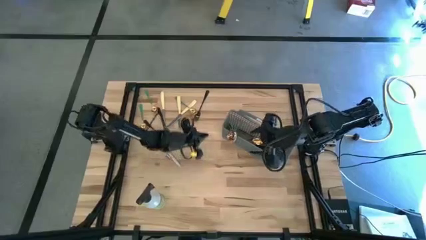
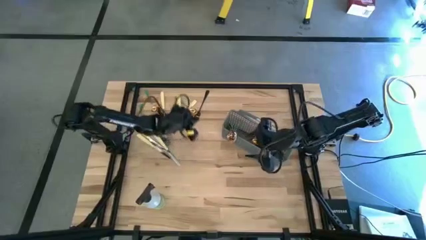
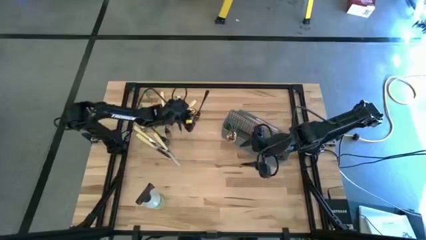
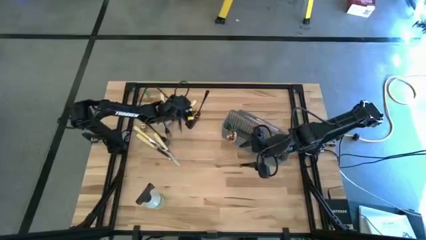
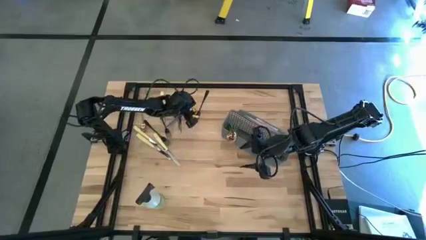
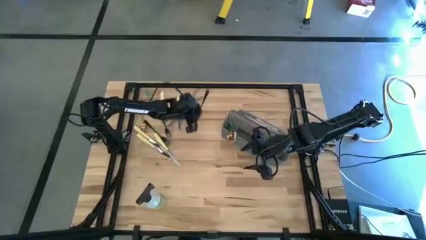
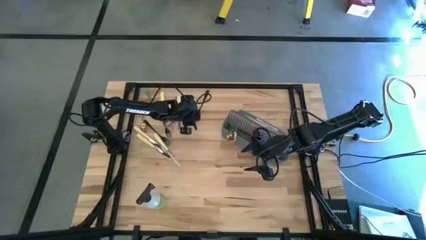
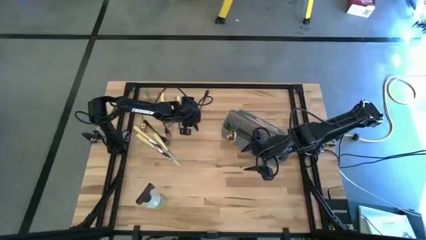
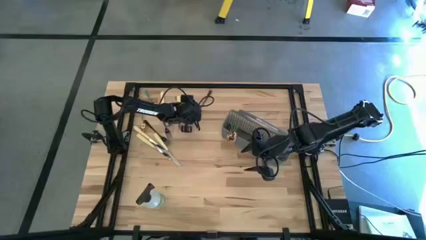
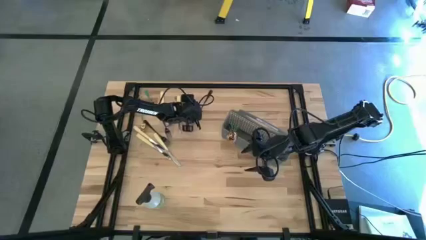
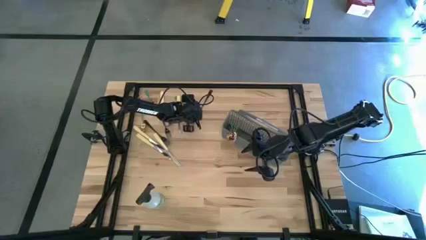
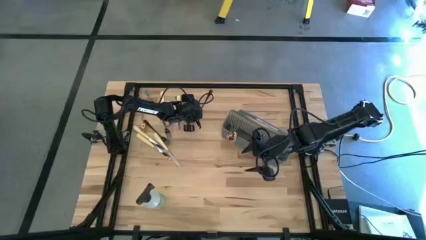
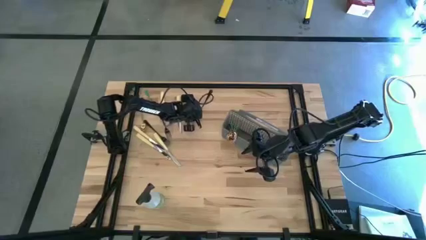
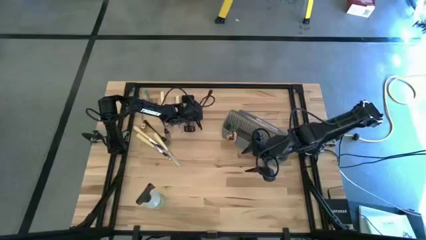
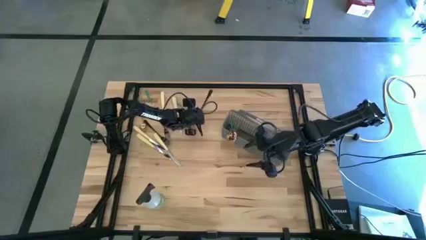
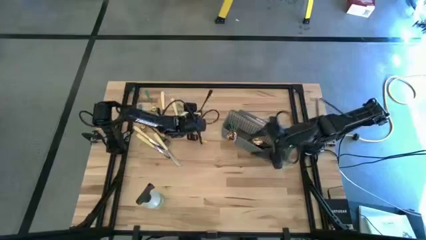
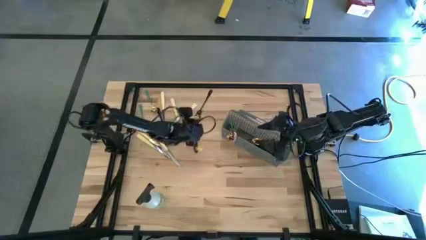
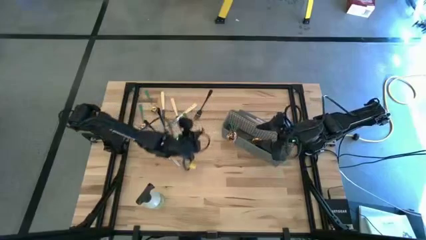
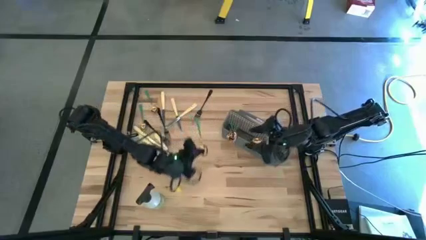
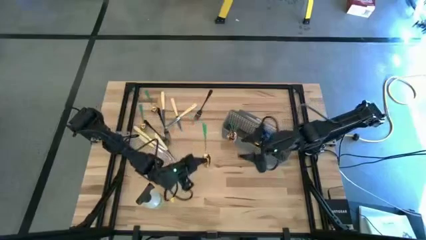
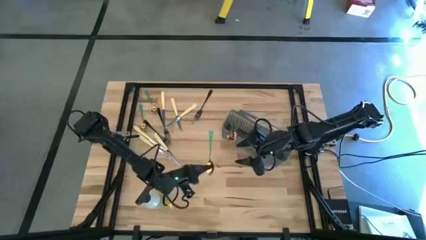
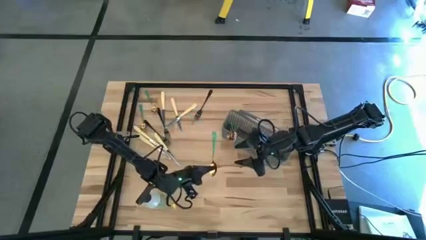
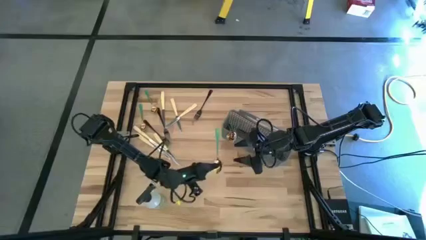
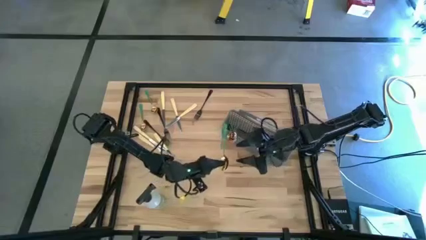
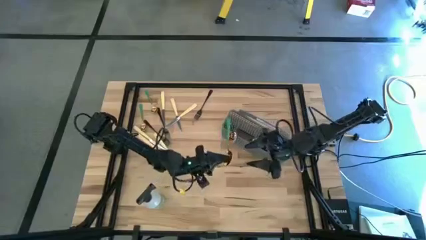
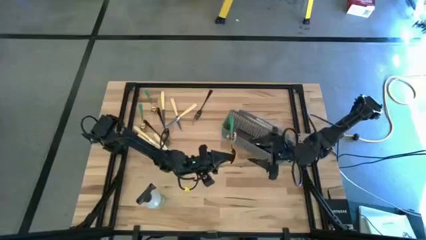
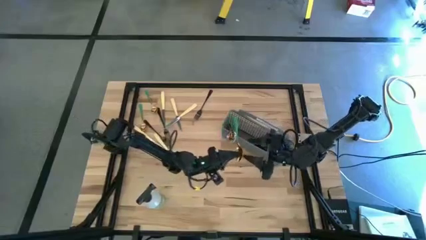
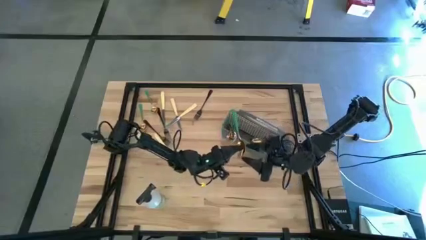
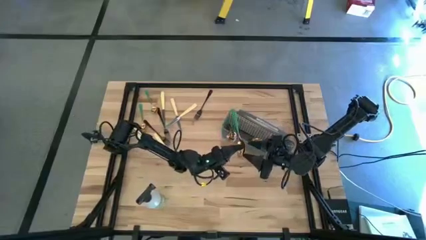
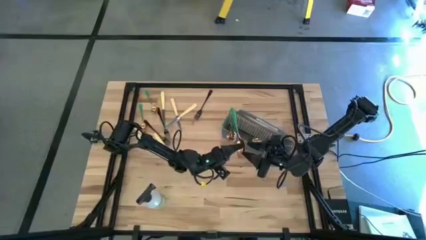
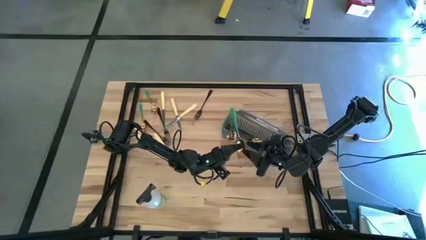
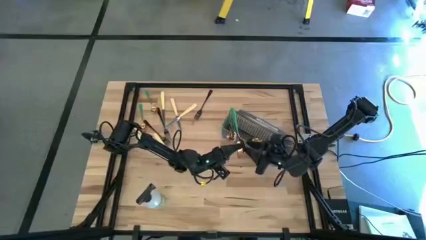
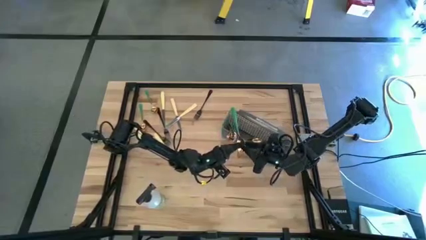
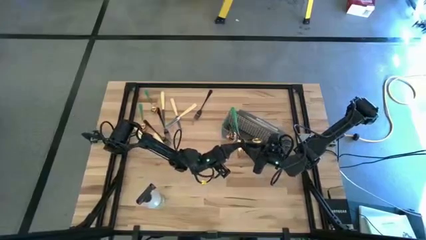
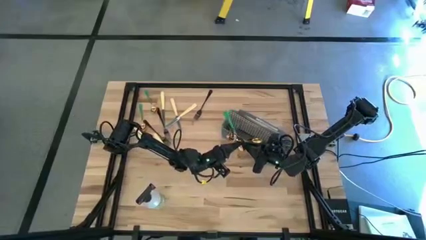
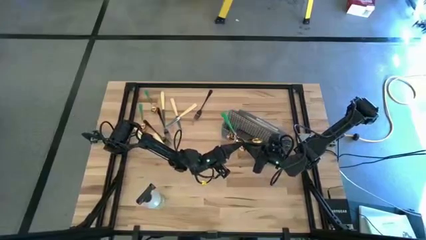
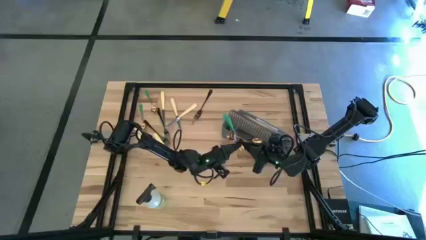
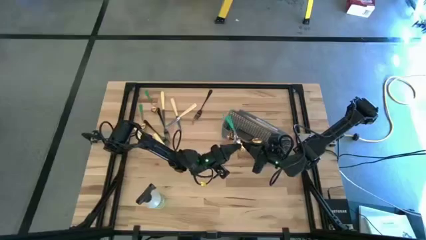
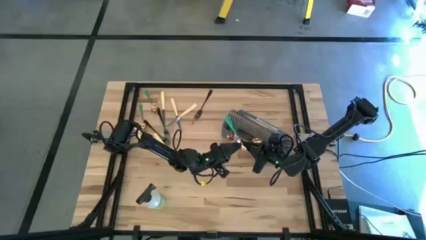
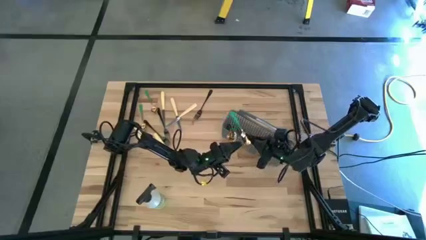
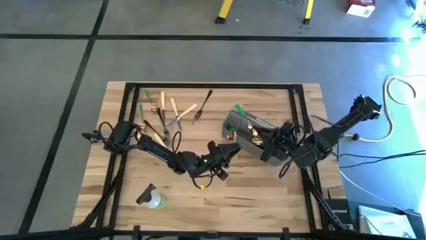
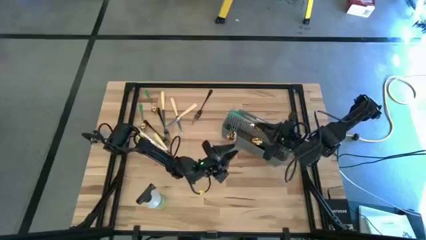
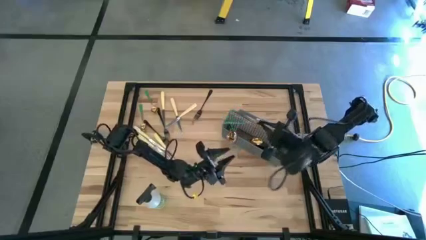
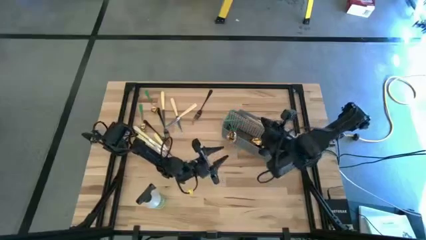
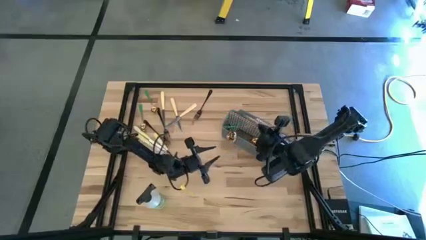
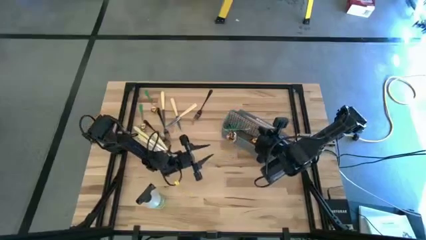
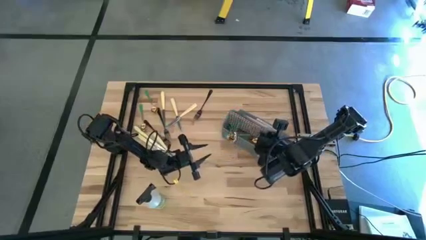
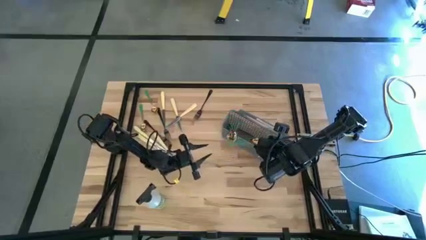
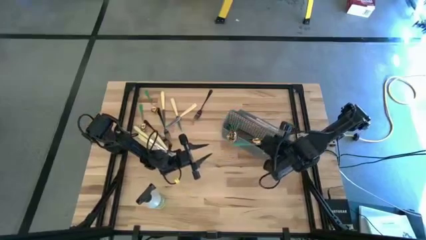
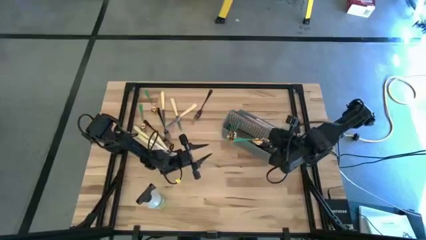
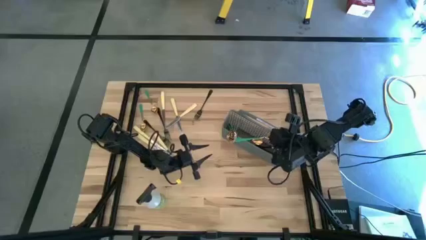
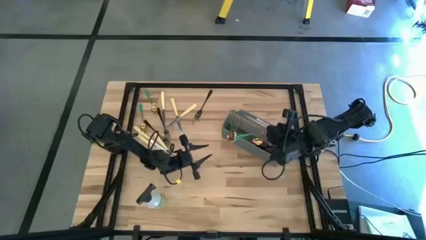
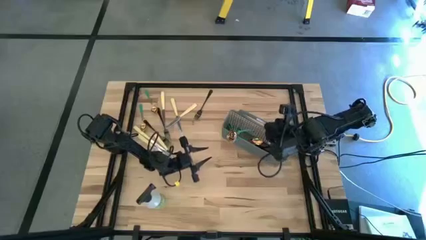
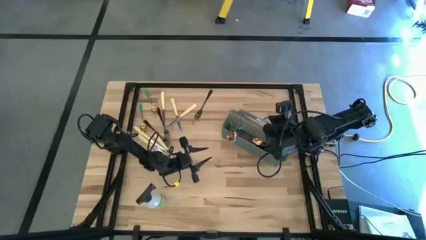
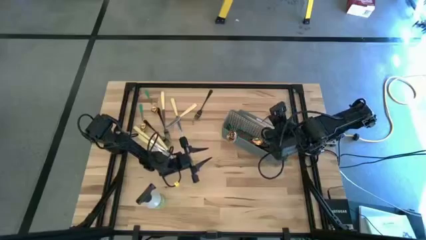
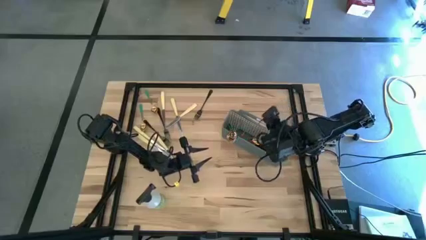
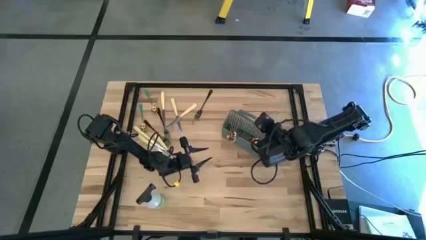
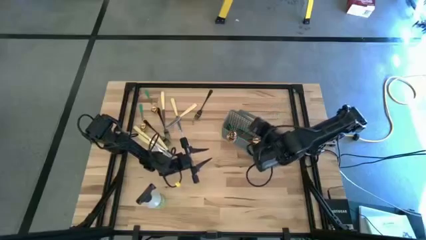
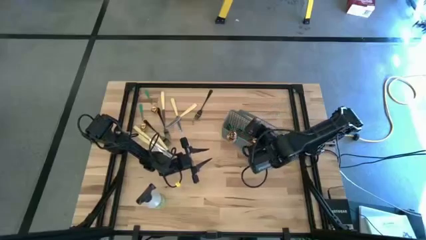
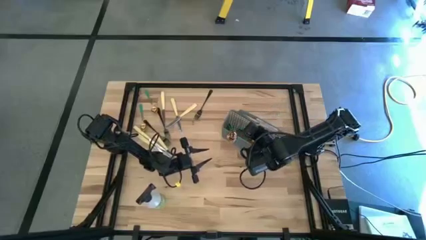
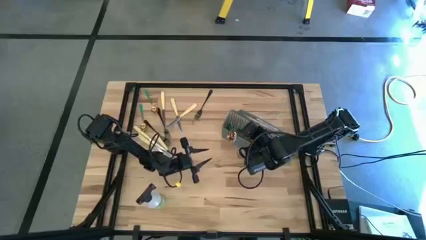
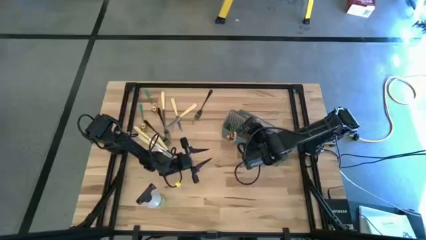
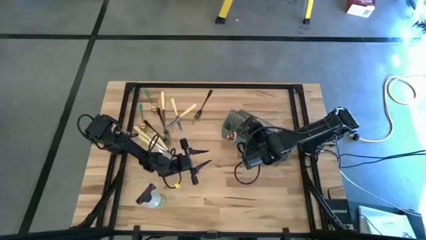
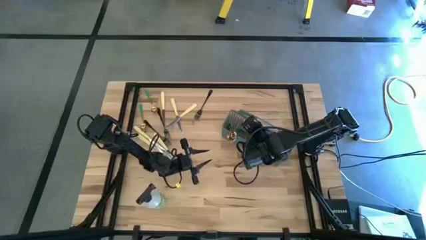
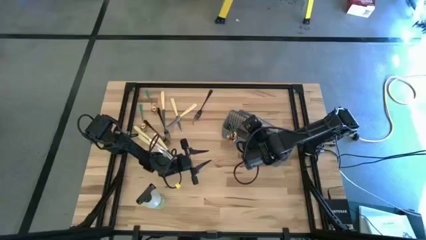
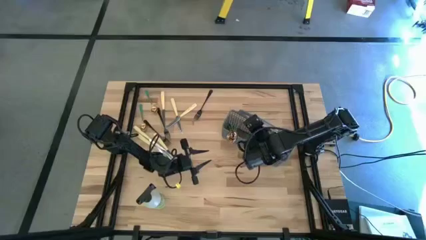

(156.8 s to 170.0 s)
Task: Sort silverware
Put the gold spoon into the cutlery rack

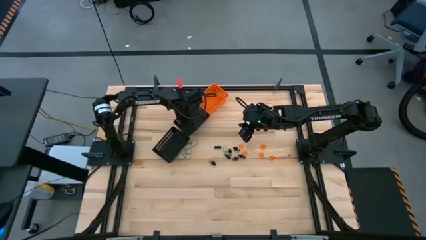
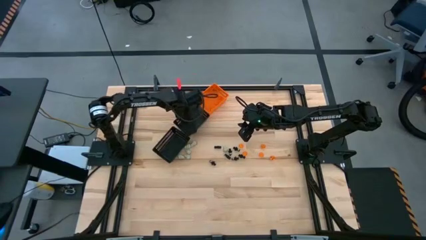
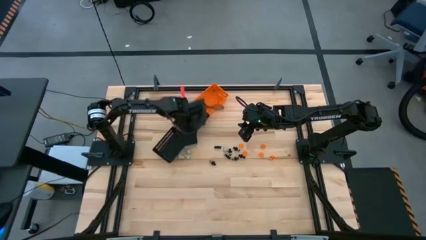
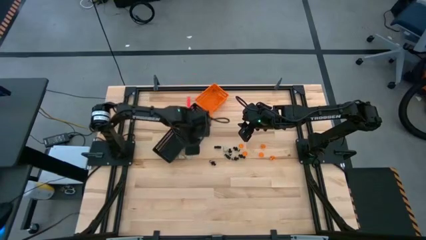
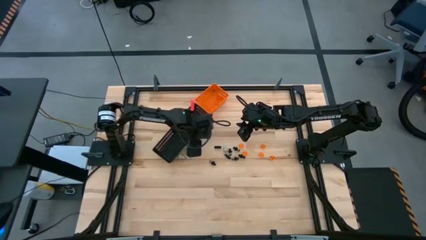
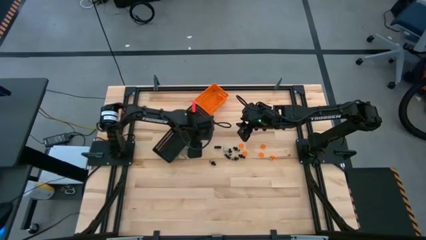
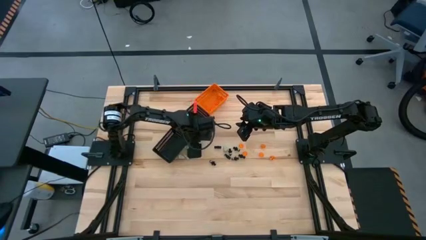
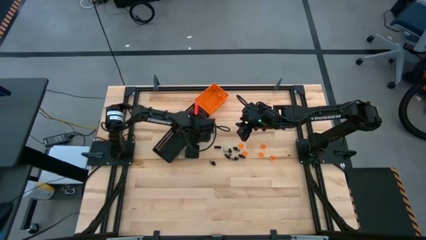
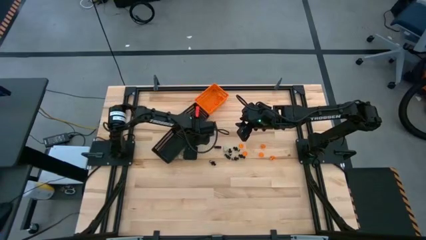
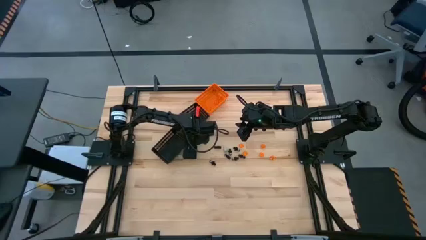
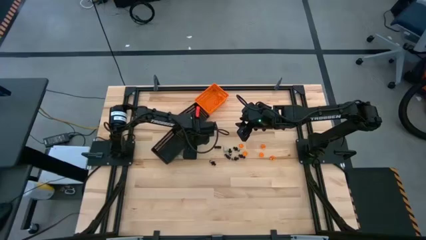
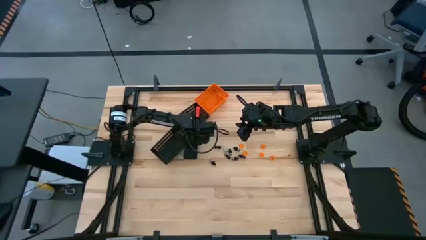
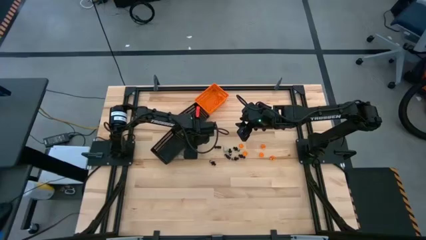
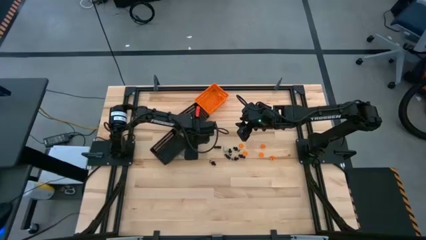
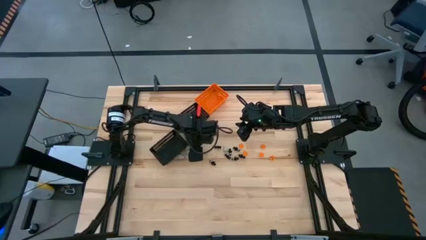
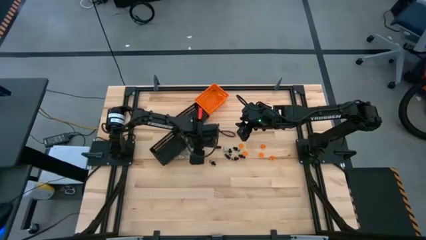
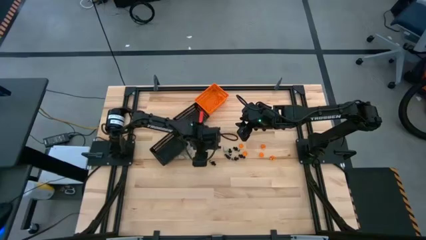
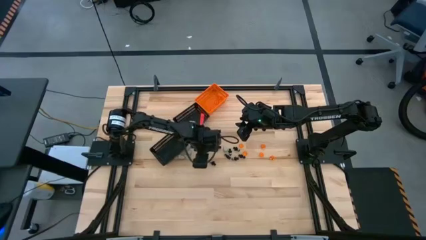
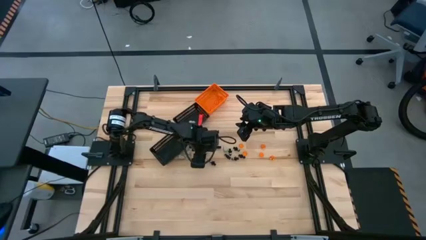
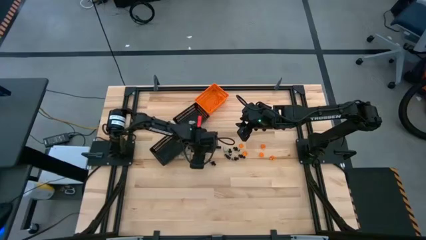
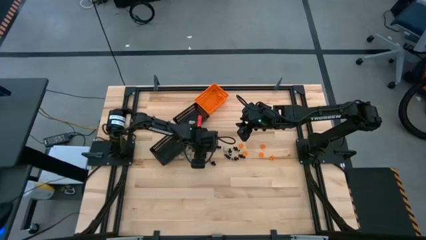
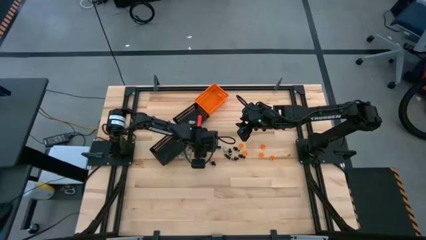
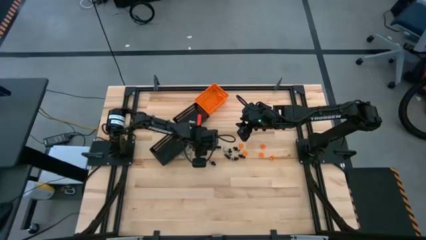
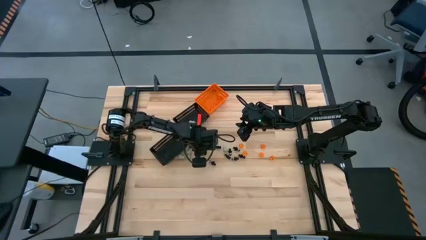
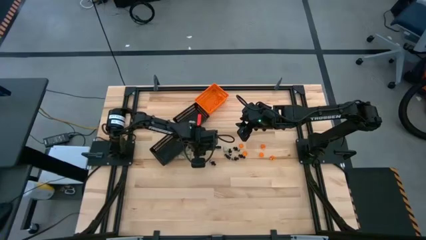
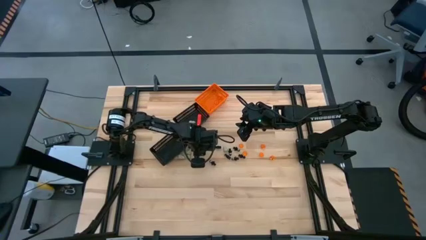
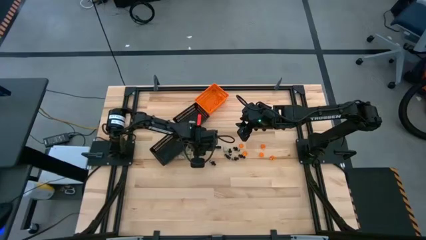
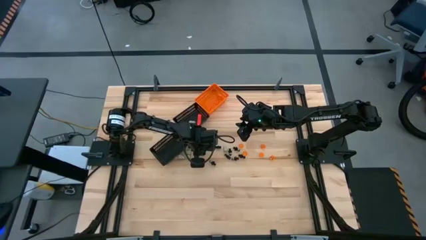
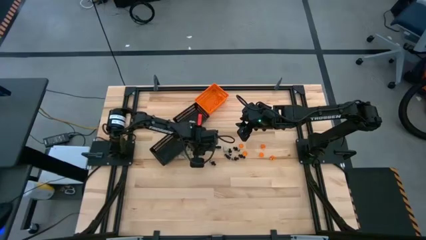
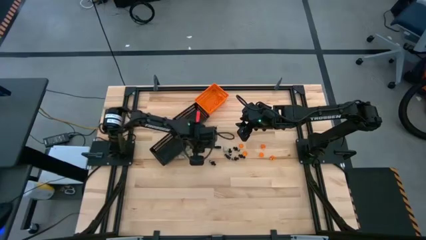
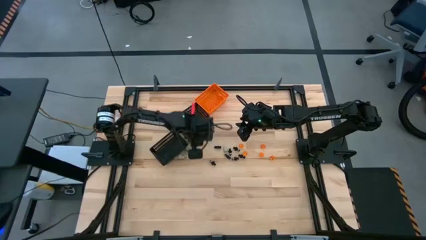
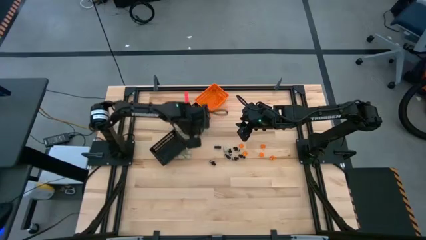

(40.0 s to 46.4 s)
Task: Sort Halloween decoration
Put the white skull toy into the top black bin
